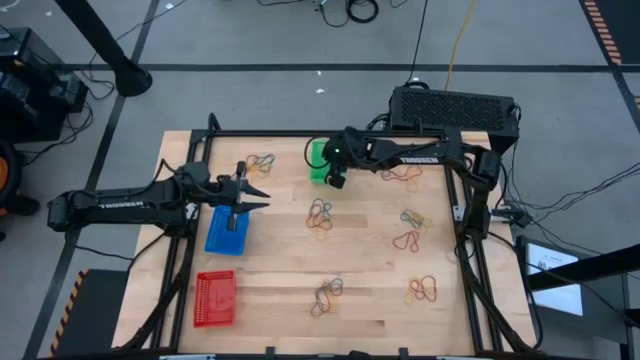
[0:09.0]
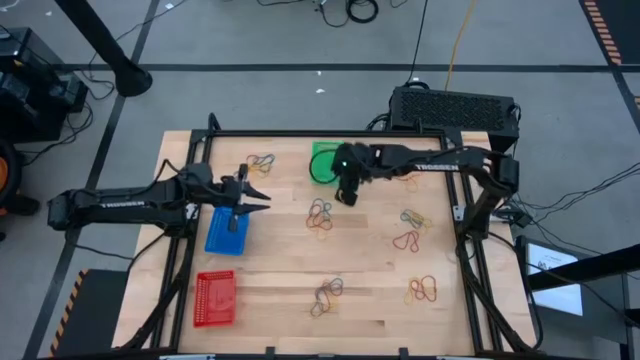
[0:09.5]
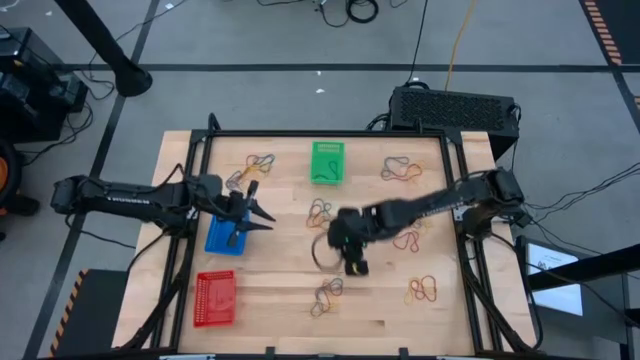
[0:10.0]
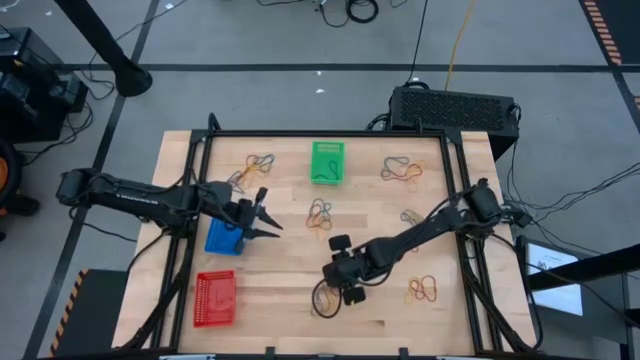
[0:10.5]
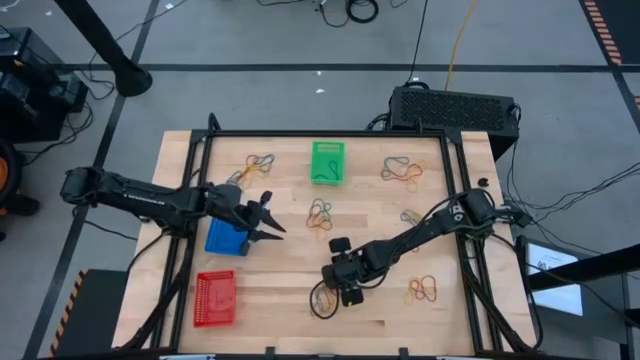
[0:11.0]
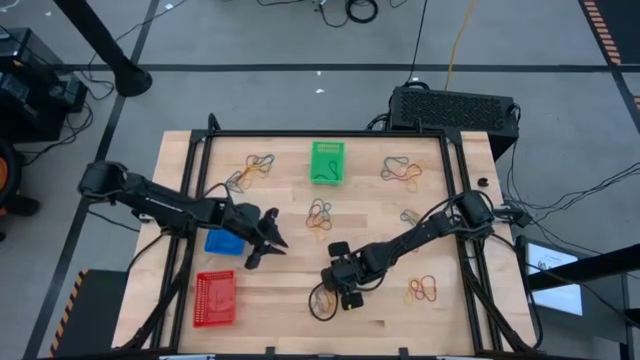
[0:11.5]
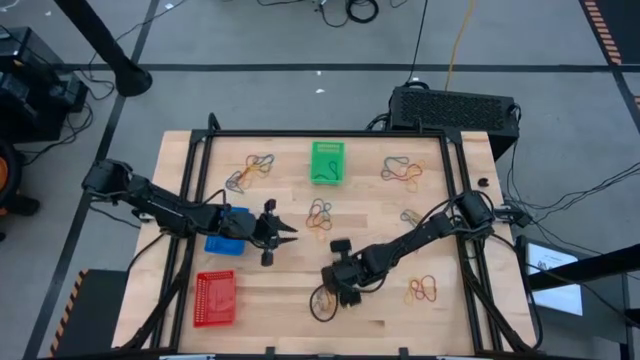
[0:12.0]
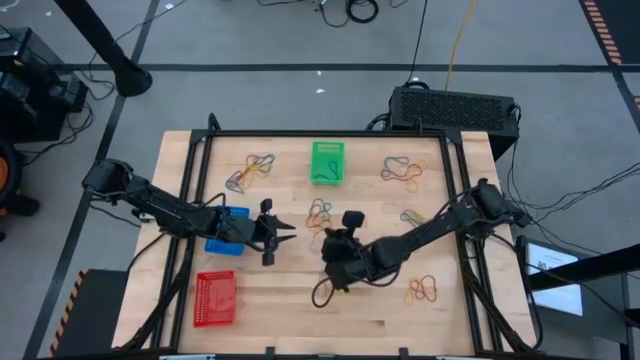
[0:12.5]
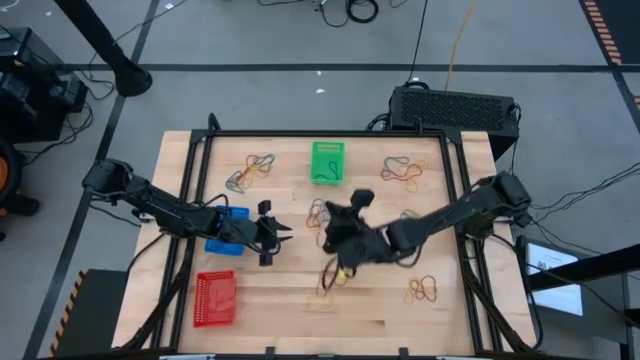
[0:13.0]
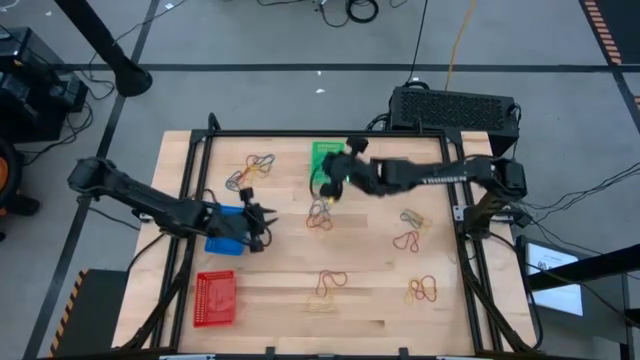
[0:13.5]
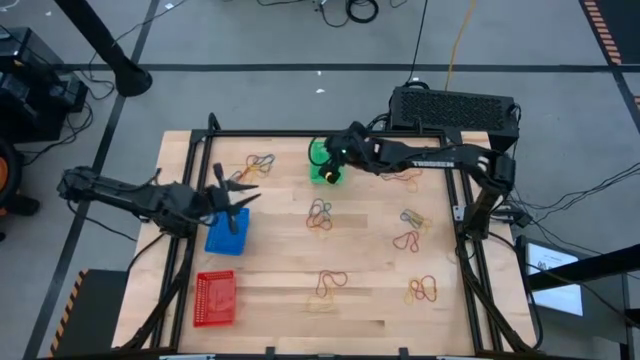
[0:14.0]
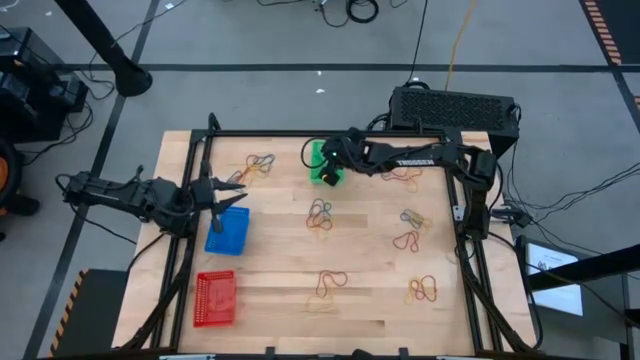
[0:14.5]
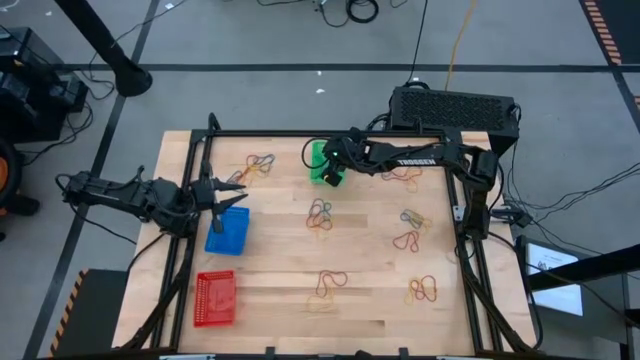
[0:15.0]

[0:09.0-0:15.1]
Task: Sort rubber bands into baskets
Put the blue rubber band into the green bin

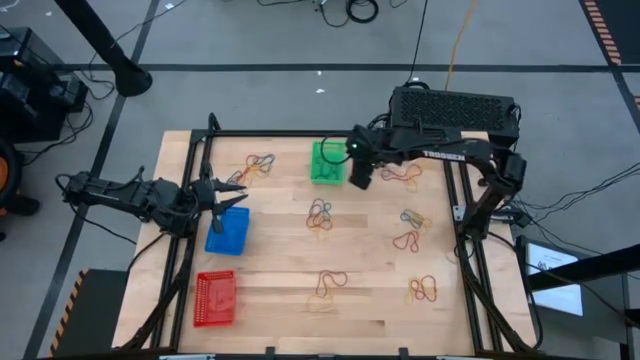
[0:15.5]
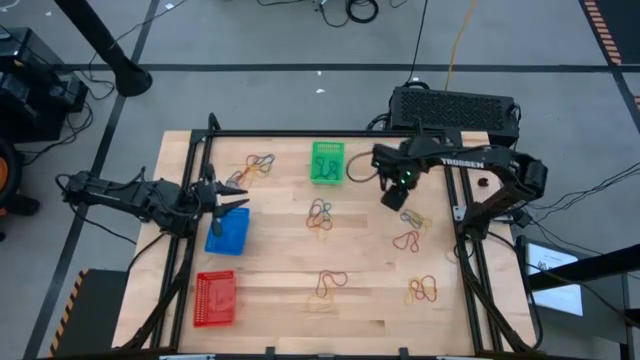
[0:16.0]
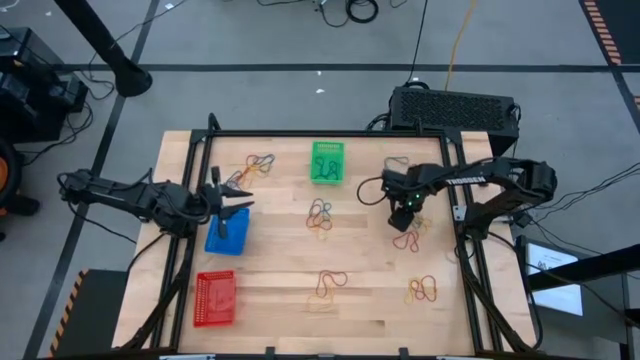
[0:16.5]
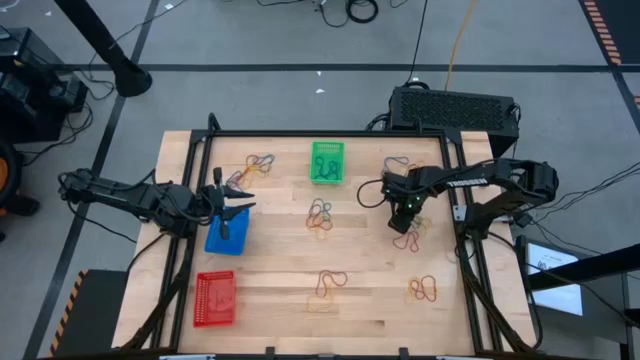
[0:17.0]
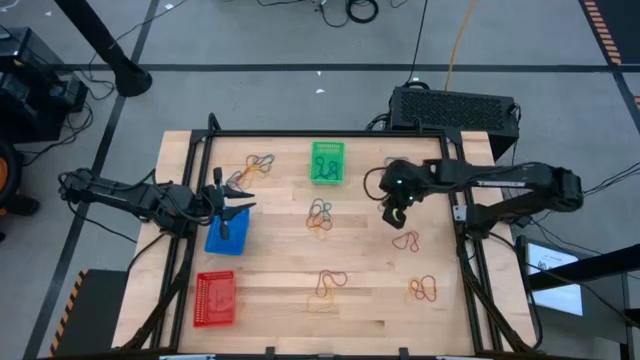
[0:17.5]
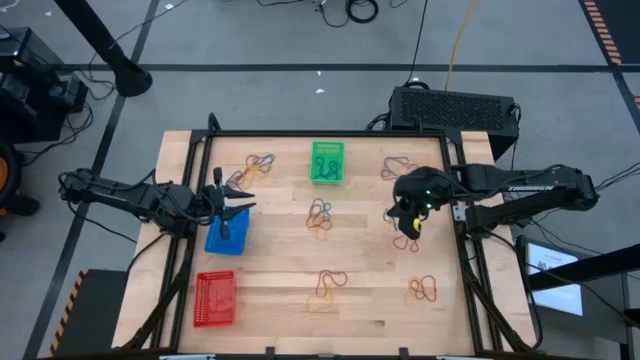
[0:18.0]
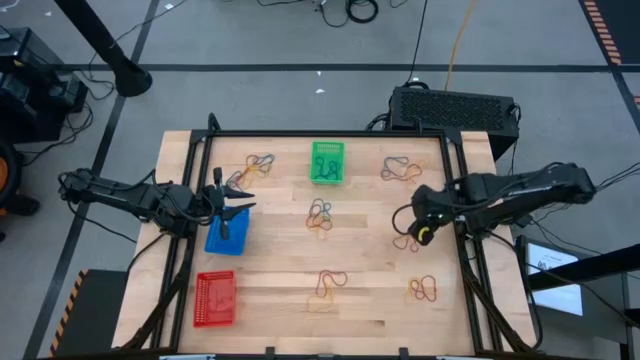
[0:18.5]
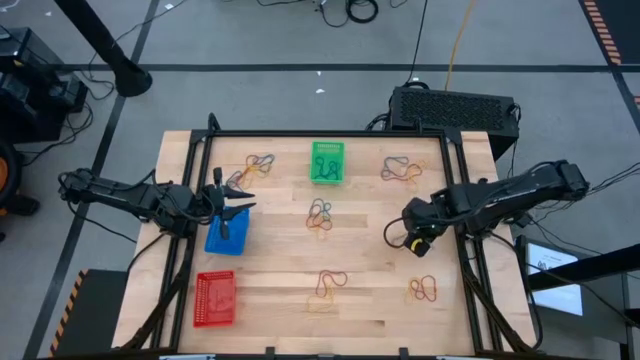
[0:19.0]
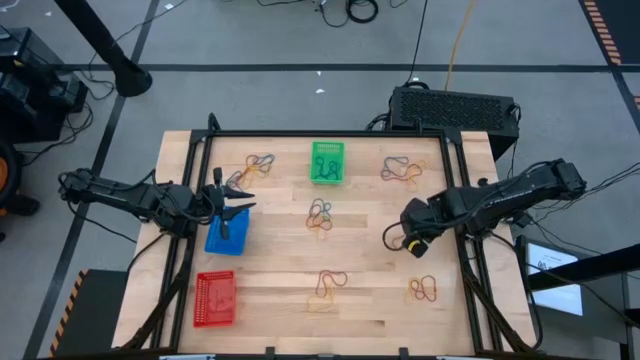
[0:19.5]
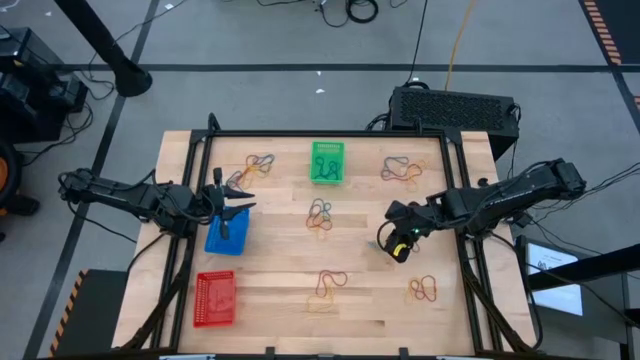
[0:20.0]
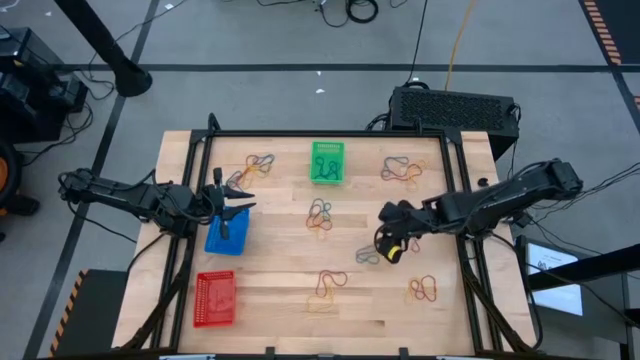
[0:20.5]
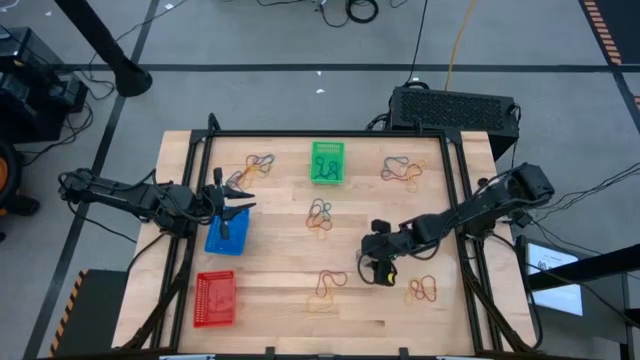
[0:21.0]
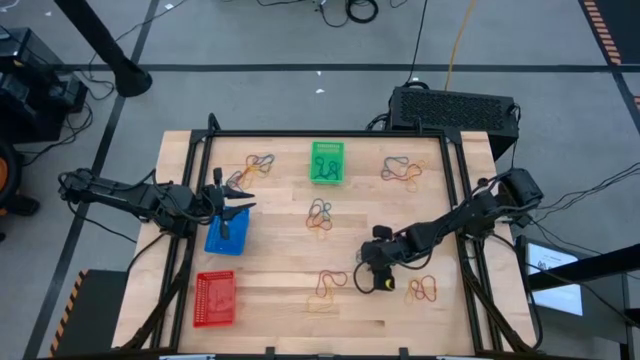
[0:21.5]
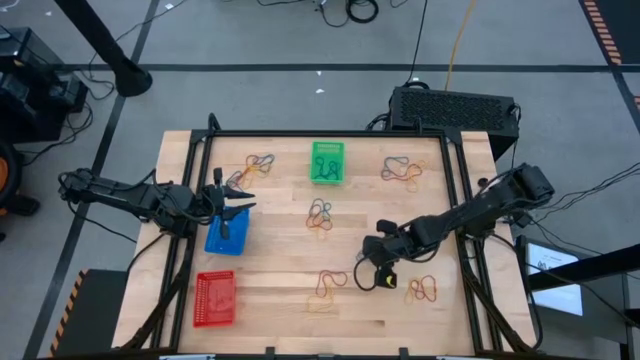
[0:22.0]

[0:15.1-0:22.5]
Put the blue rubber band into the green bin

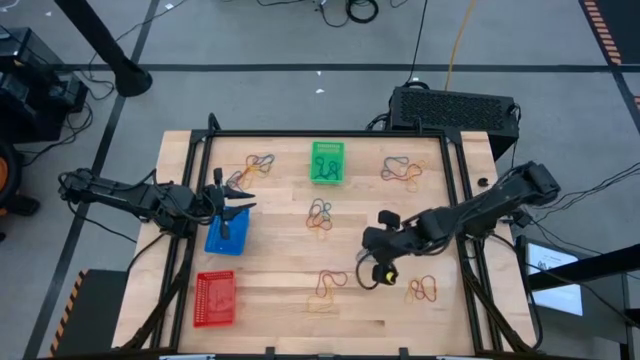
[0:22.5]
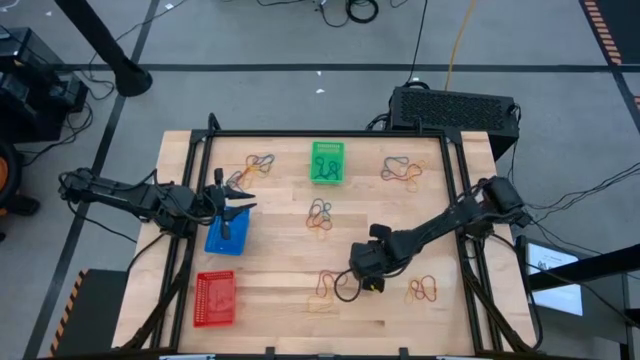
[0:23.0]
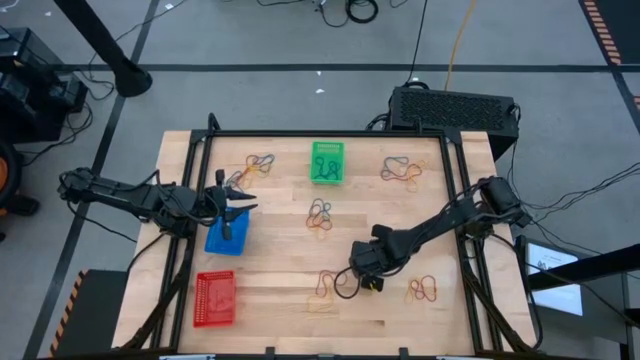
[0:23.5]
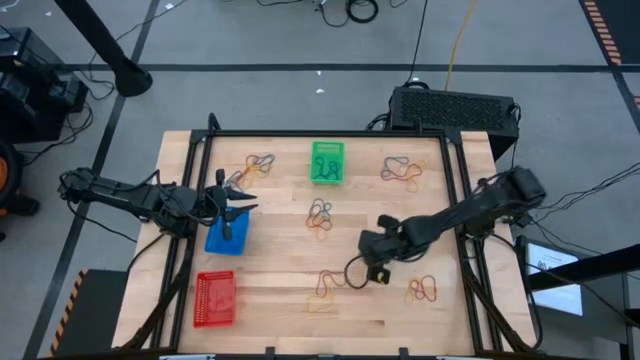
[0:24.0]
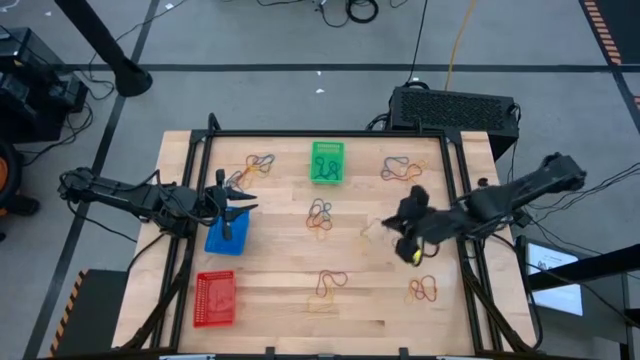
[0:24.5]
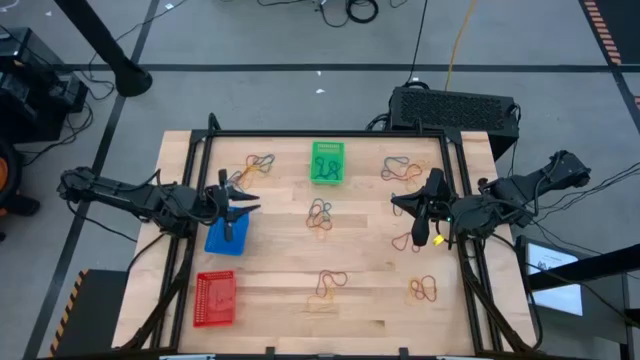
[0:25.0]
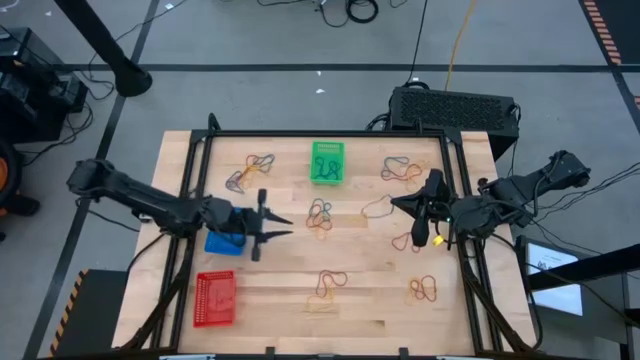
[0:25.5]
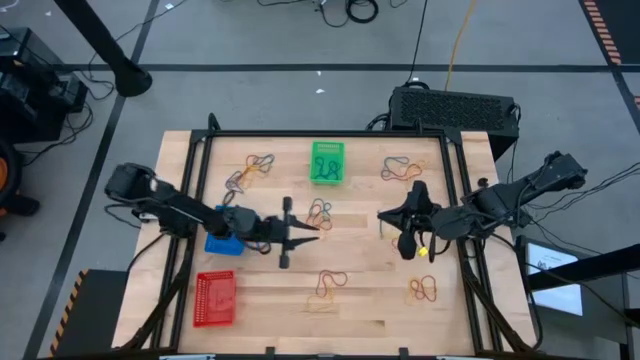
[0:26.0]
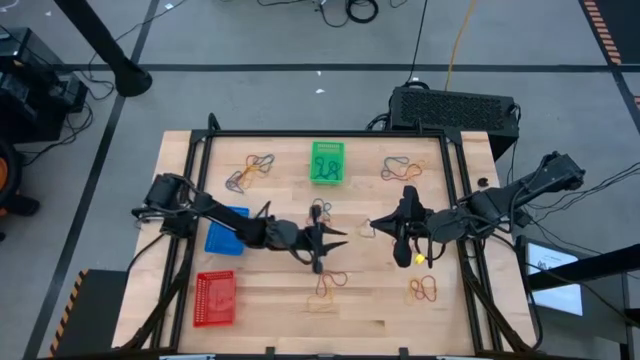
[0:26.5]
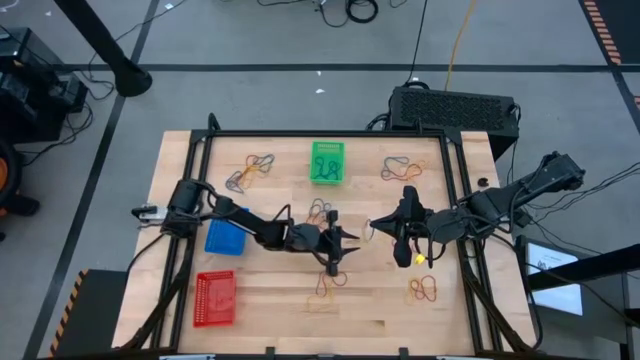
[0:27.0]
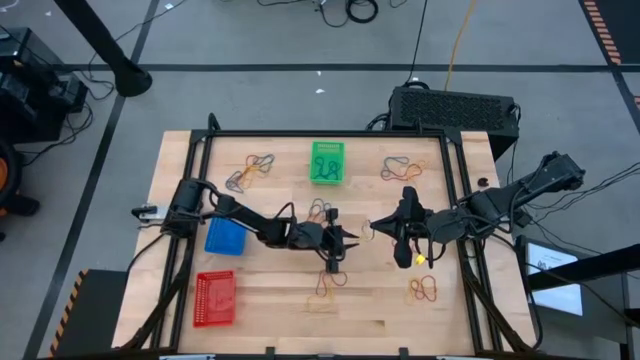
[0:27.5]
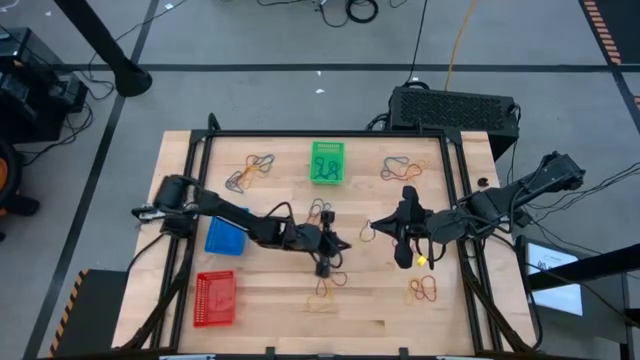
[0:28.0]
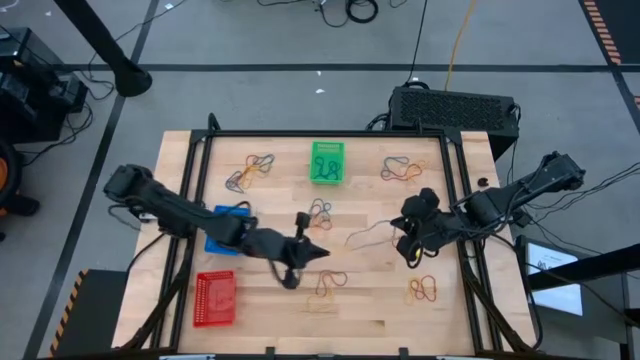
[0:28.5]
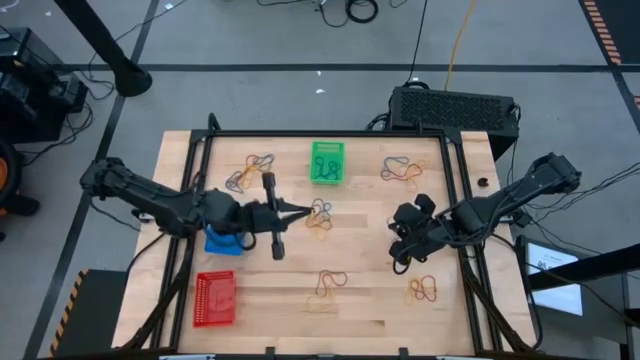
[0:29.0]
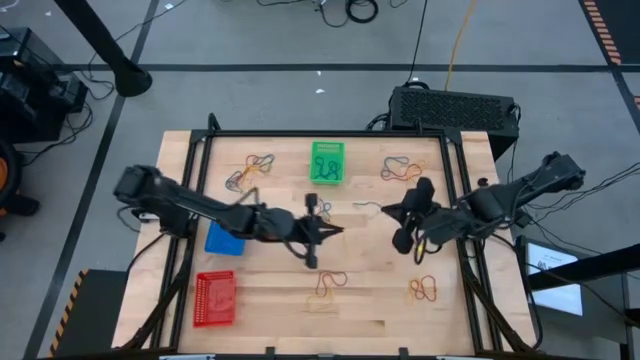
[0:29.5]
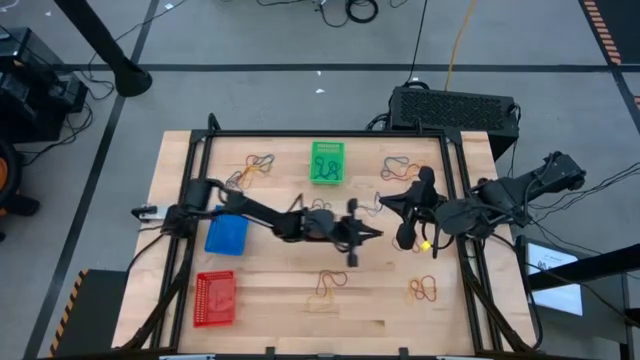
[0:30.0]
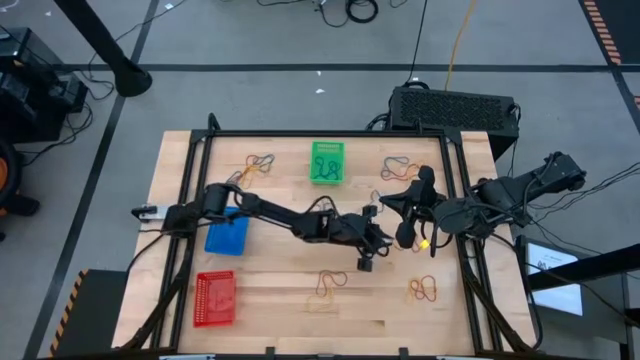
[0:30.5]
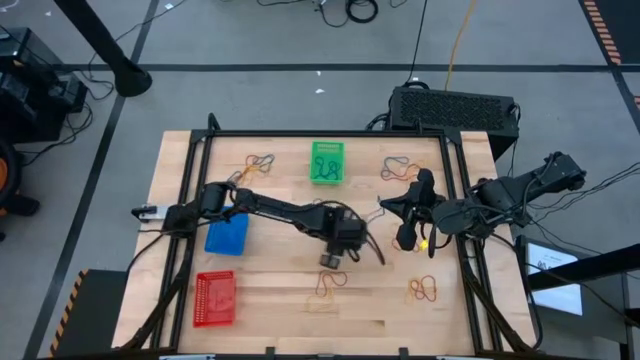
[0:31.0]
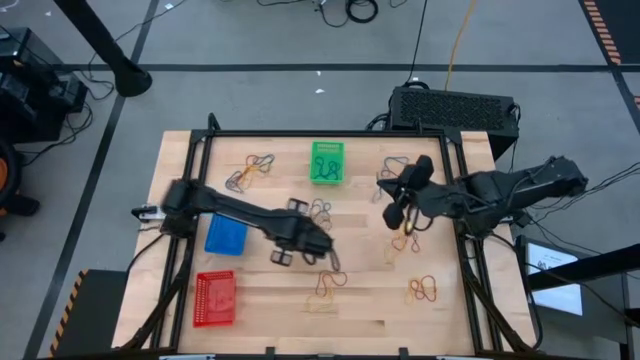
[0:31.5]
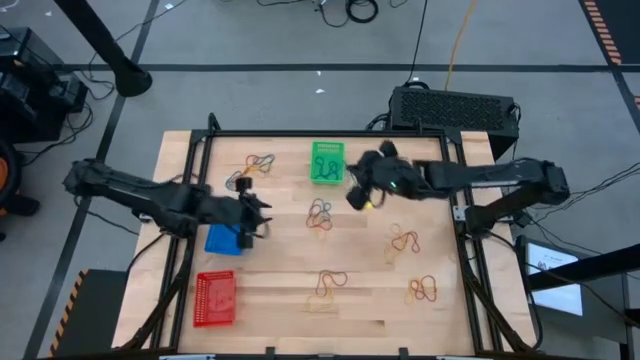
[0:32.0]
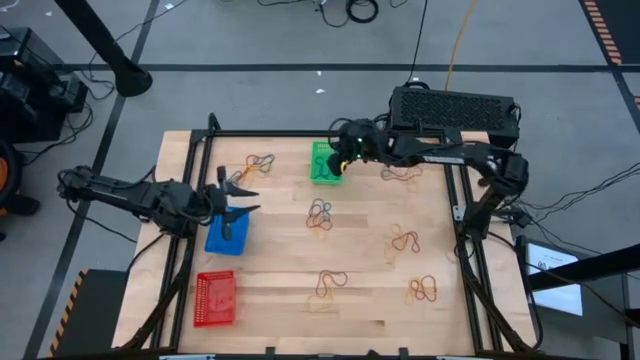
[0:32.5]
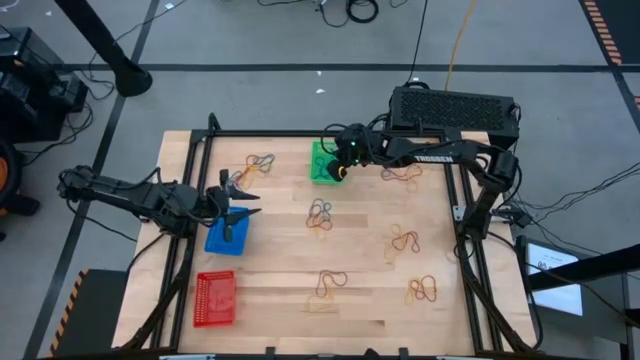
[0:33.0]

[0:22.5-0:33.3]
Put the blue rubber band into the green bin
